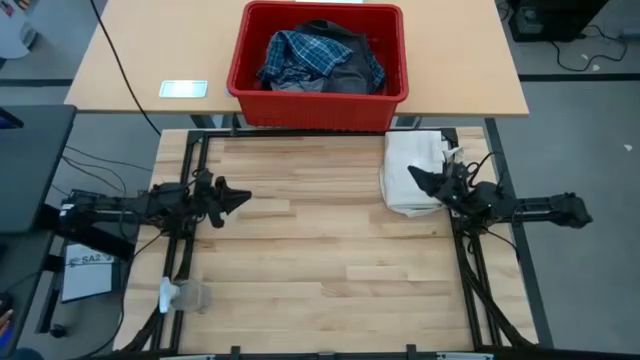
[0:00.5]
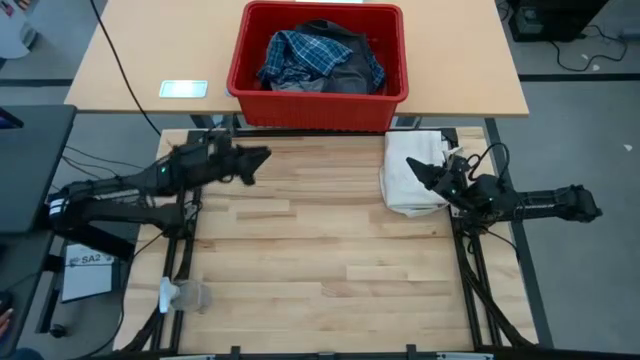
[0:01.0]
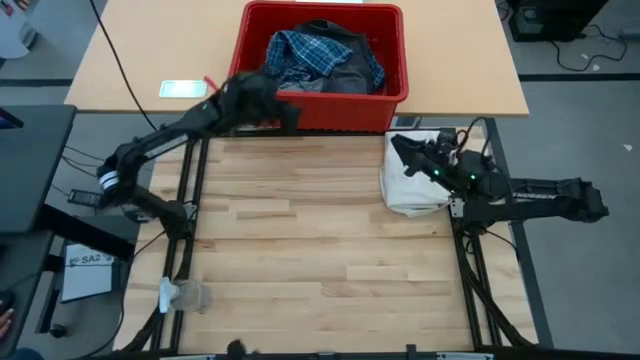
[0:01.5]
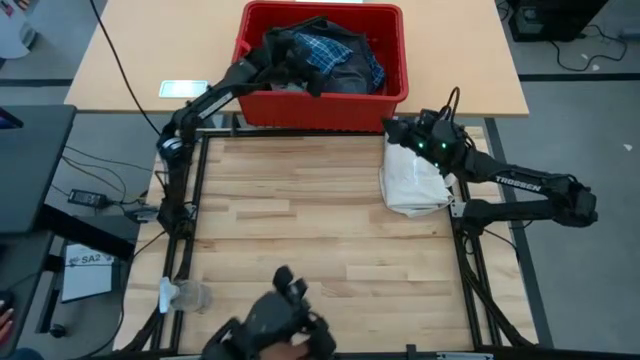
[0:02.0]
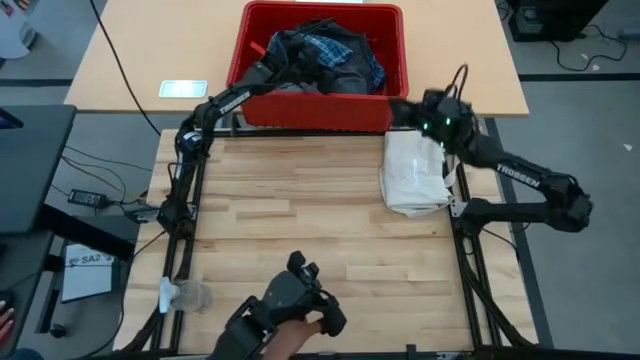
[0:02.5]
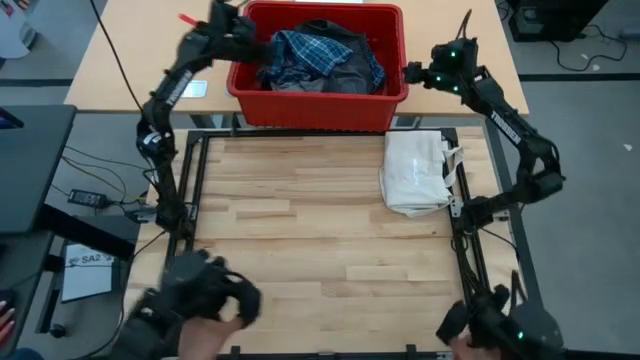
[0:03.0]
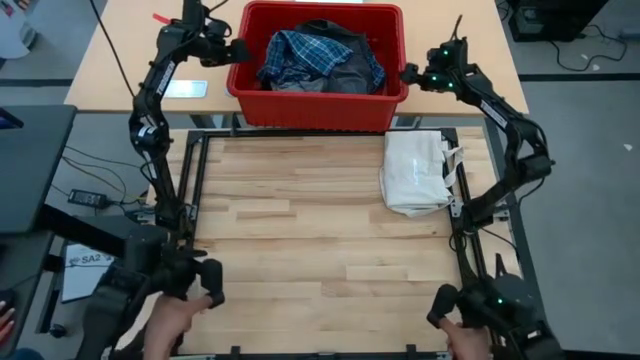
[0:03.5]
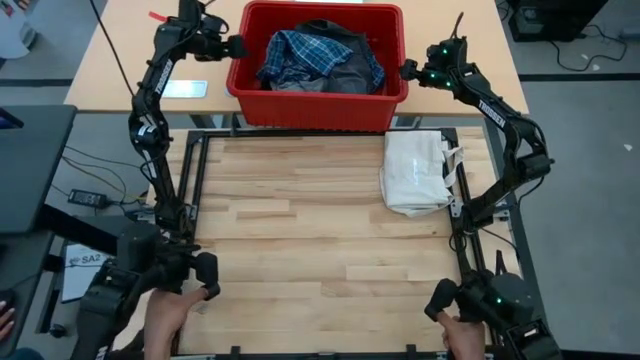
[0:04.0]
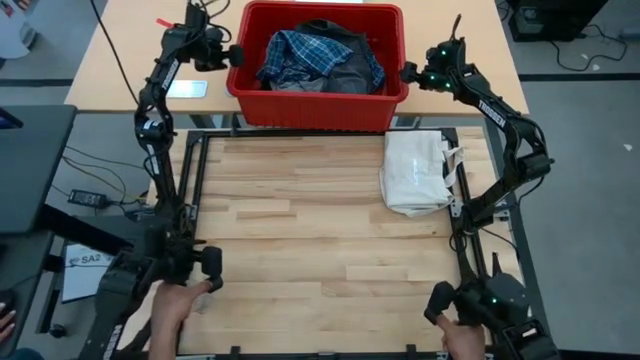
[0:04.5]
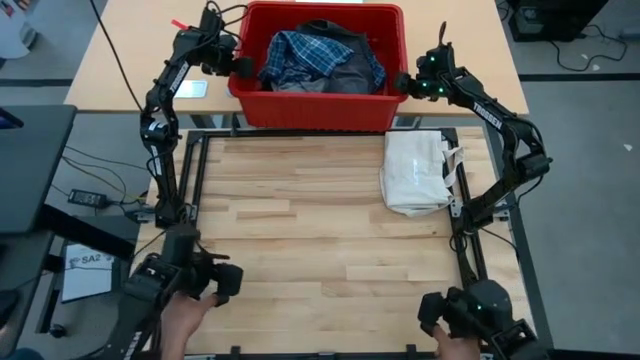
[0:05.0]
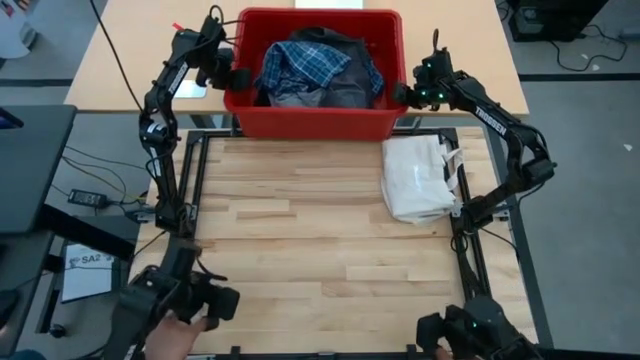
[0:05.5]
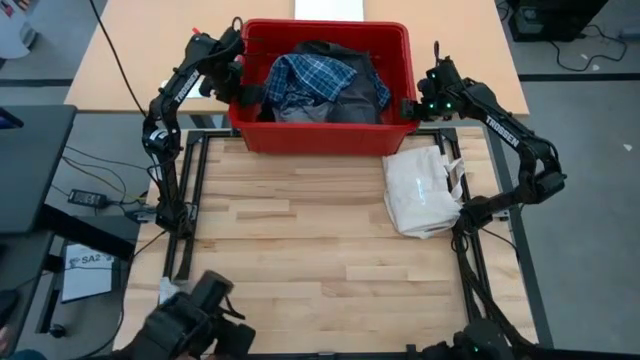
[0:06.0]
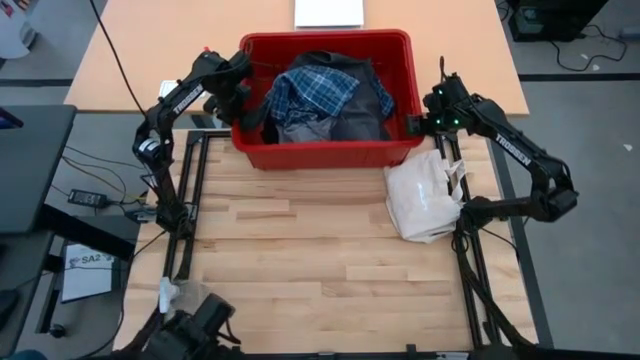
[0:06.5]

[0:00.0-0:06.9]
Task: Fold Laundry from Bin
Adjust the laundry bin

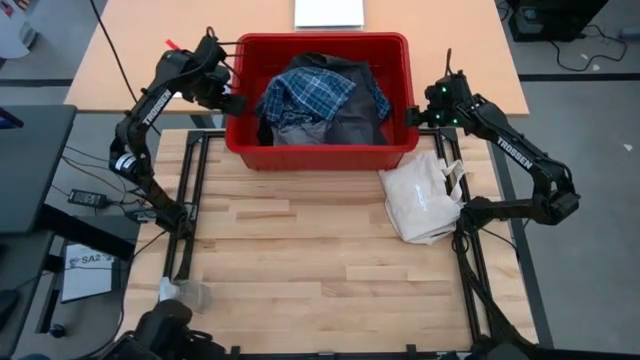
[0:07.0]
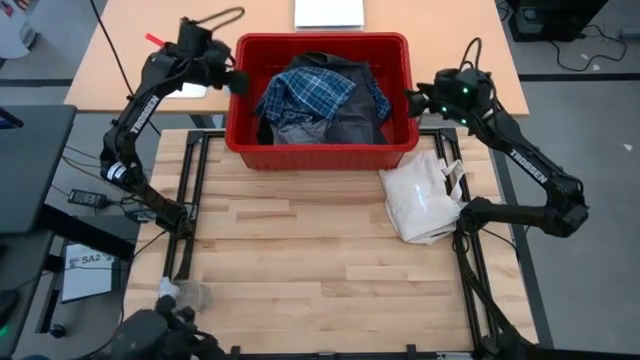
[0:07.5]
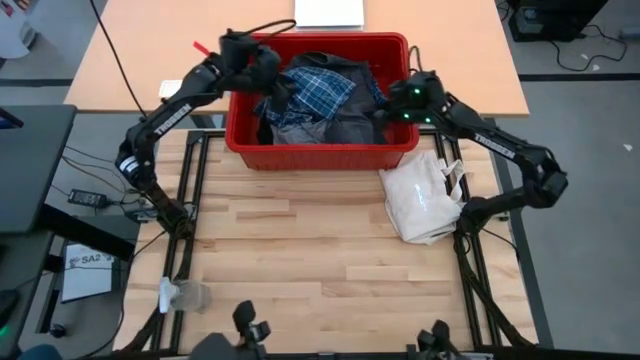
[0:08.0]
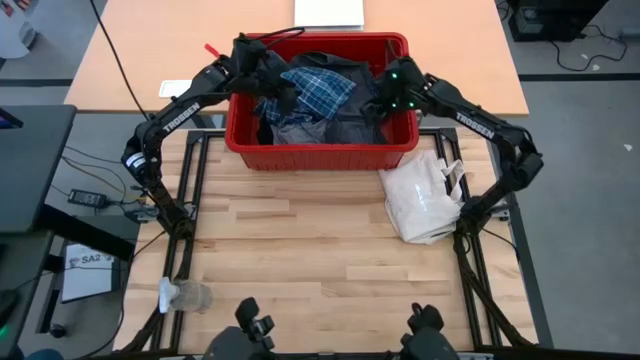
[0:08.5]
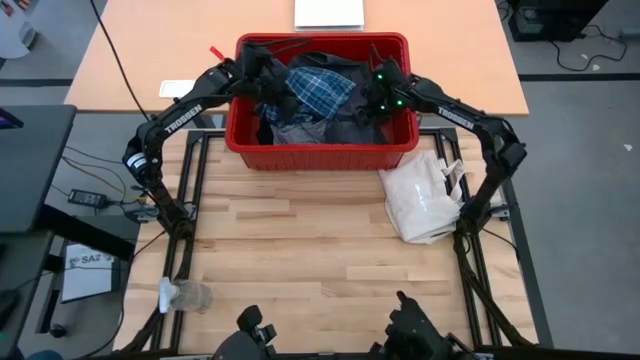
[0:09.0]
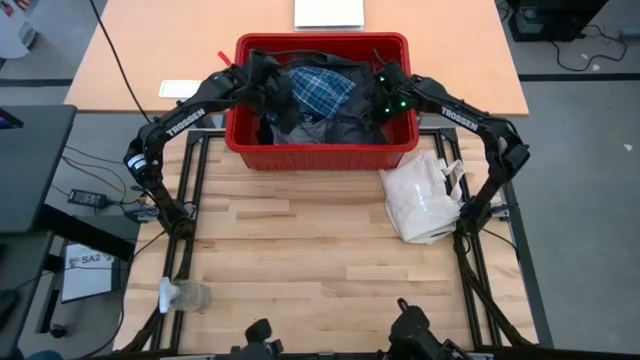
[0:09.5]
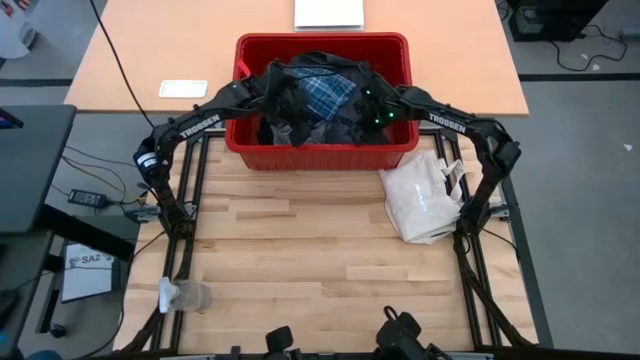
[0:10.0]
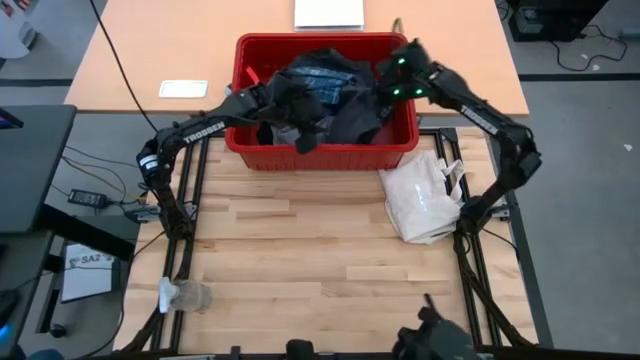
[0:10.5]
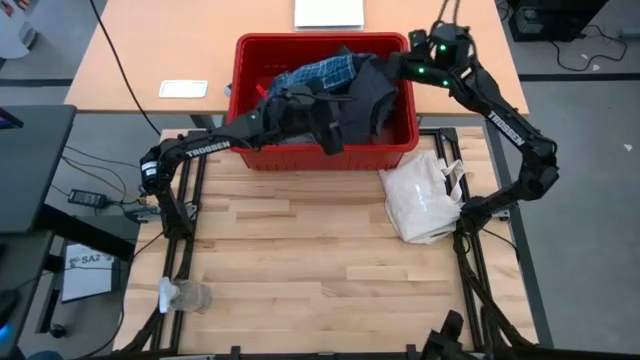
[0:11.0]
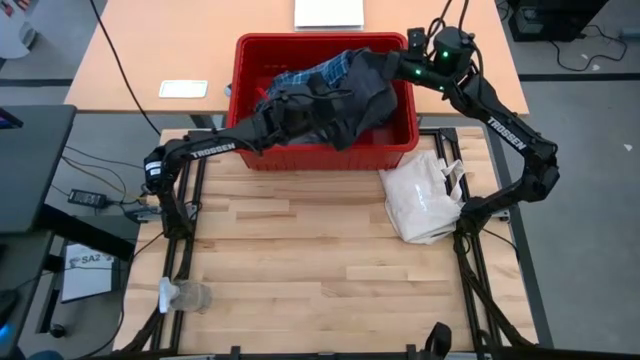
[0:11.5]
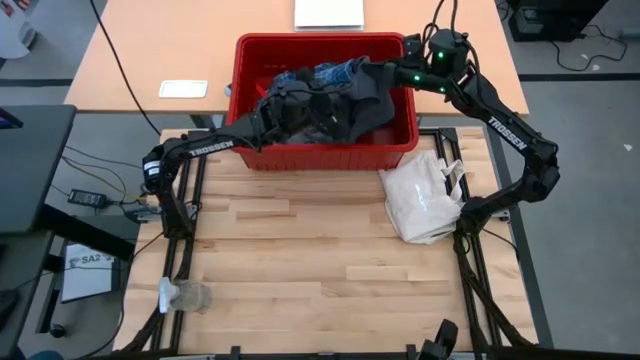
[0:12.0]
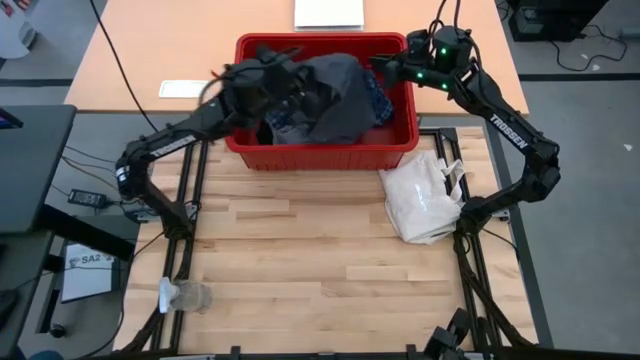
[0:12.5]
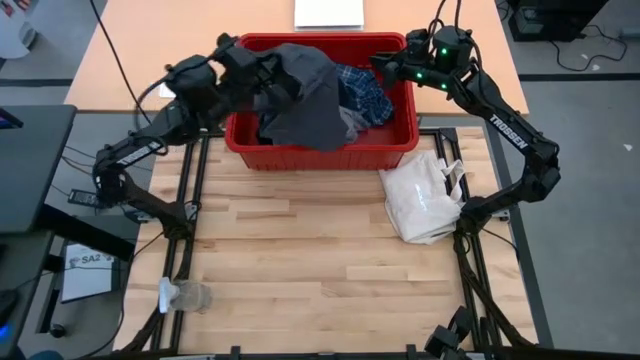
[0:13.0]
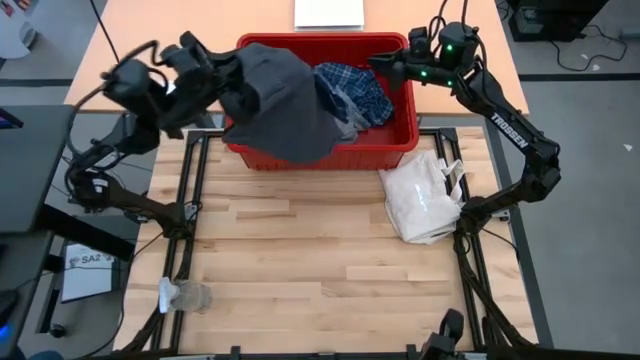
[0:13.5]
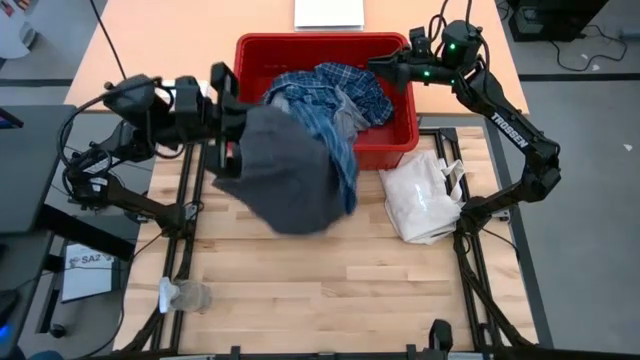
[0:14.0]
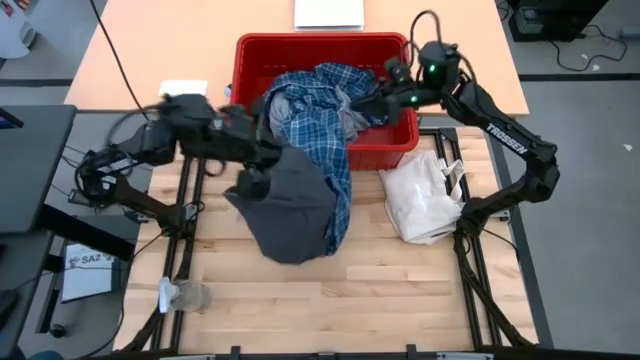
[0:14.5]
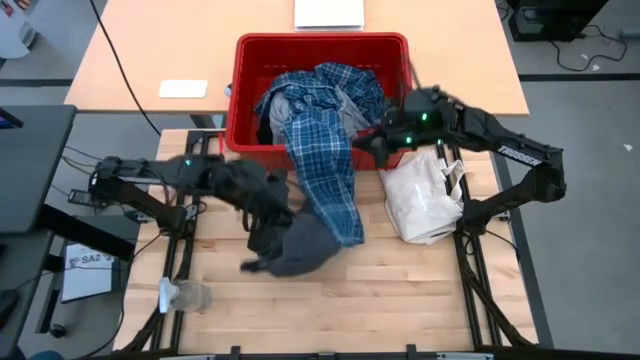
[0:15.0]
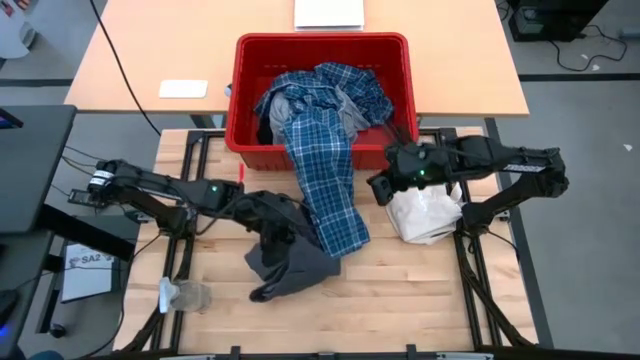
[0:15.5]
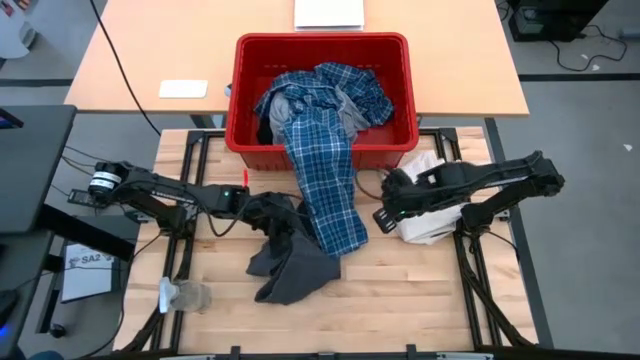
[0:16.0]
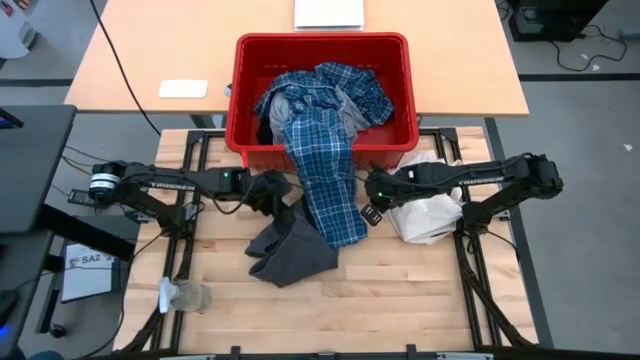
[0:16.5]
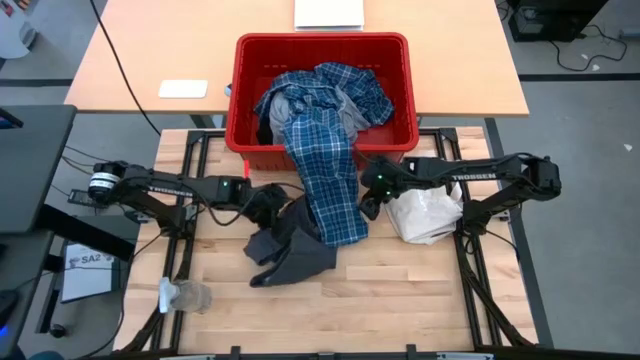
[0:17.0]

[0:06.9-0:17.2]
Remove the black shorts from the laundry bin

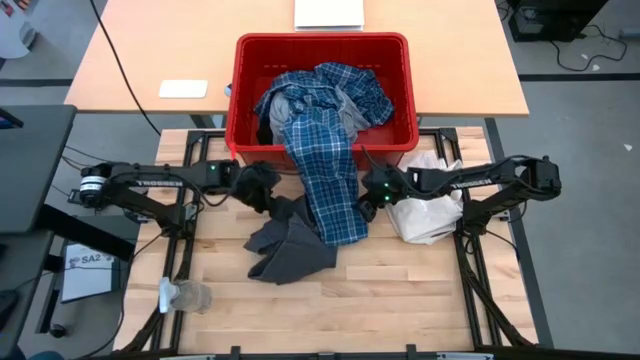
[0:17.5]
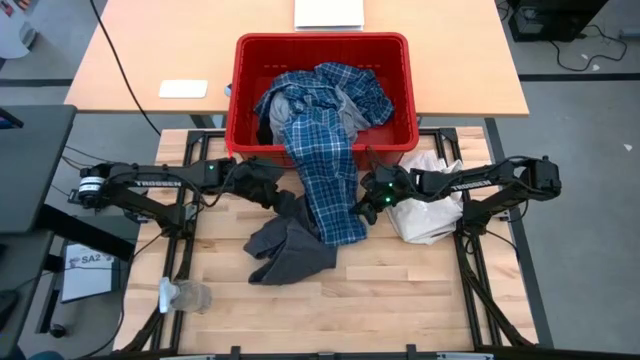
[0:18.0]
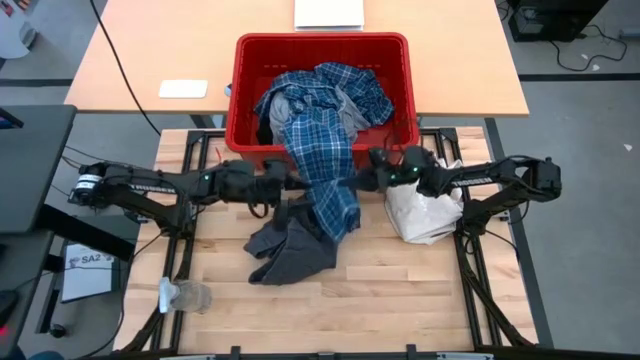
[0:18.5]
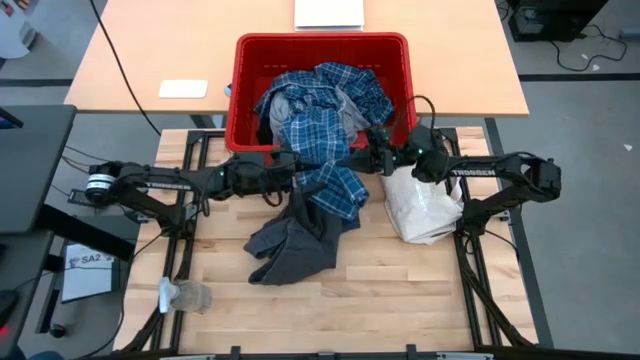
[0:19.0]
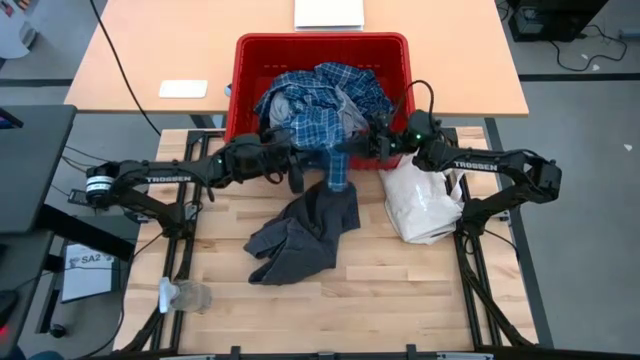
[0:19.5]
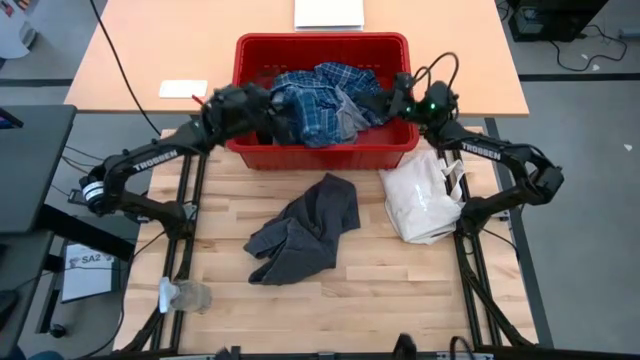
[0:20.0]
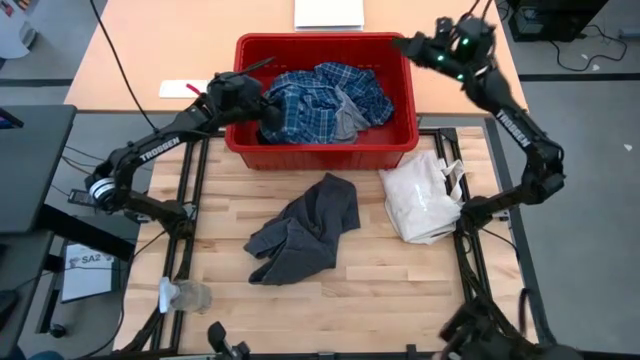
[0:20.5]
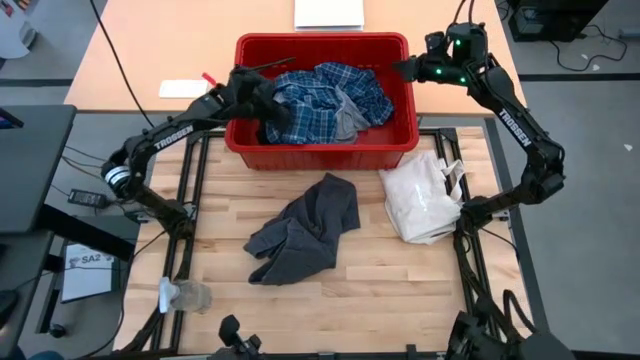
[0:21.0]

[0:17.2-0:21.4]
Adjust the plaid pants

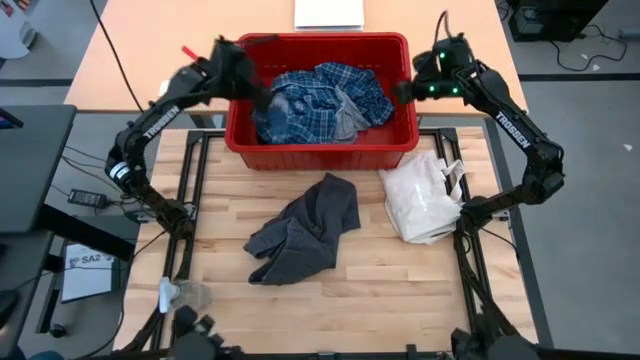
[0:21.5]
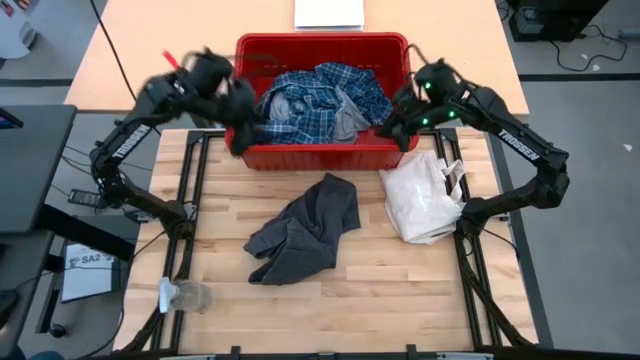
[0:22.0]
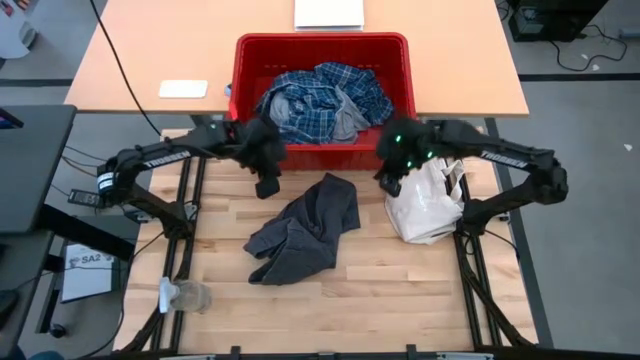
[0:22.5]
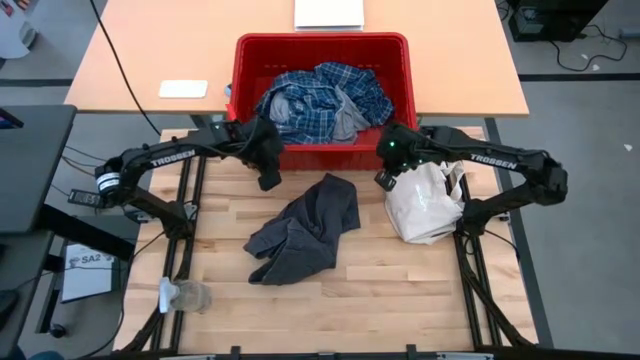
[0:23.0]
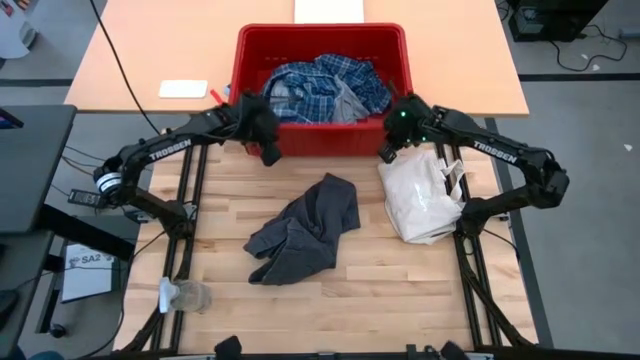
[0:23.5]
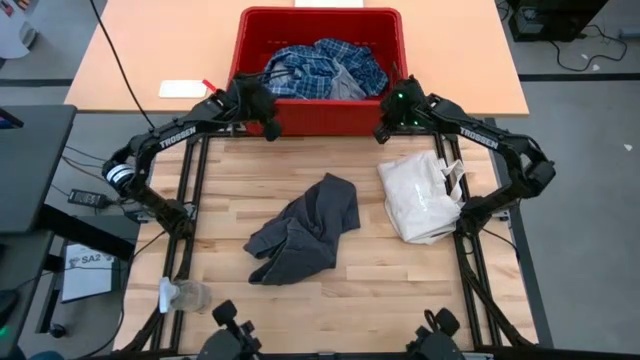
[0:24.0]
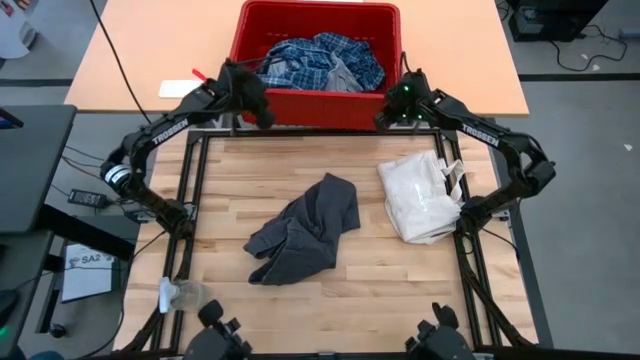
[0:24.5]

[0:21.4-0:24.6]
Adjust the laundry bin
